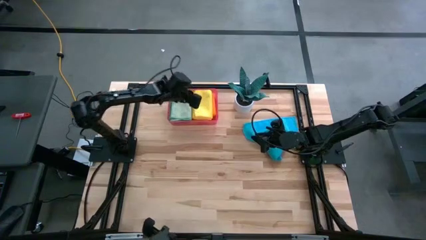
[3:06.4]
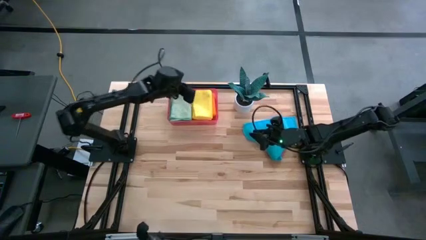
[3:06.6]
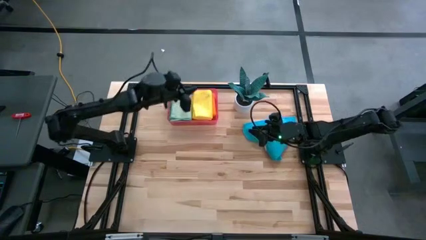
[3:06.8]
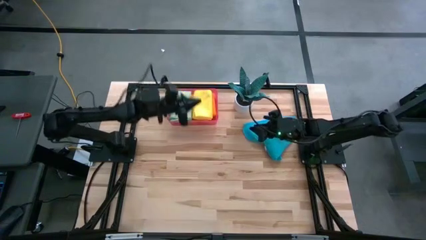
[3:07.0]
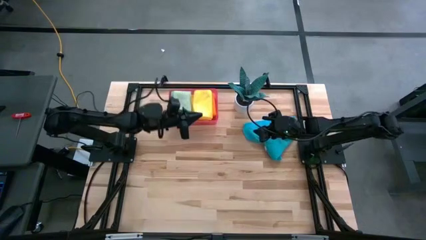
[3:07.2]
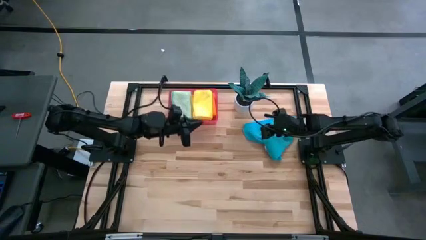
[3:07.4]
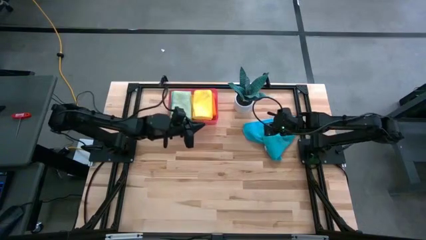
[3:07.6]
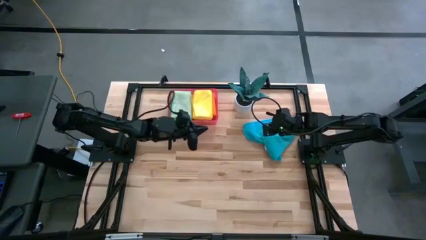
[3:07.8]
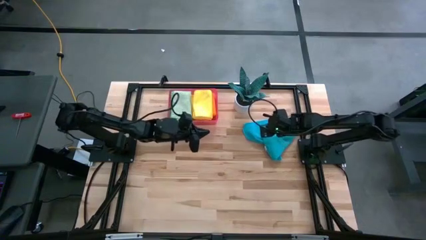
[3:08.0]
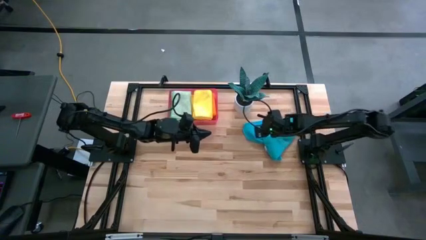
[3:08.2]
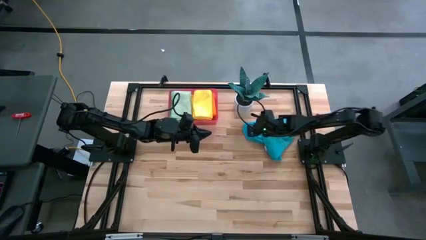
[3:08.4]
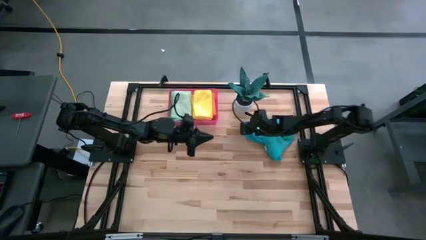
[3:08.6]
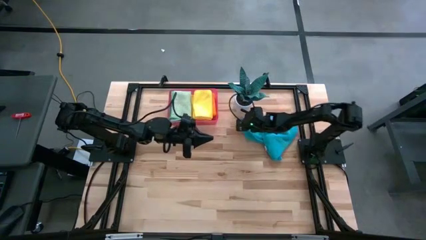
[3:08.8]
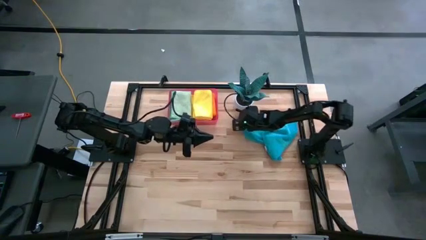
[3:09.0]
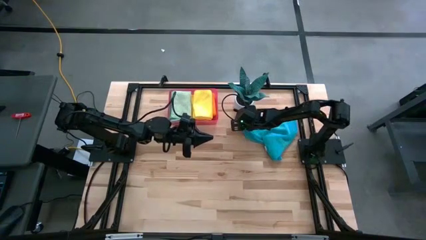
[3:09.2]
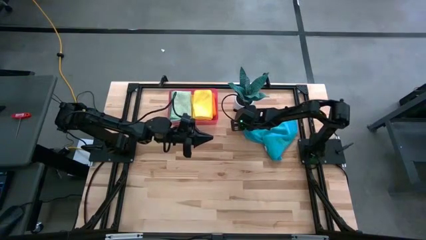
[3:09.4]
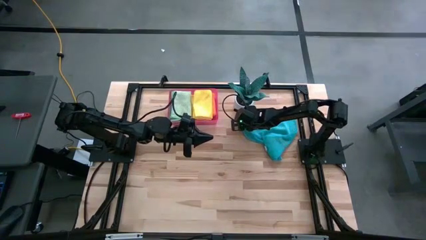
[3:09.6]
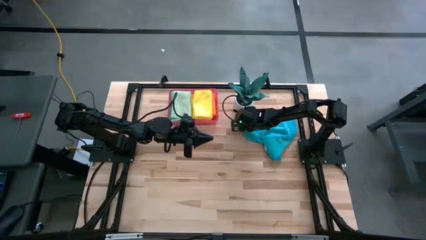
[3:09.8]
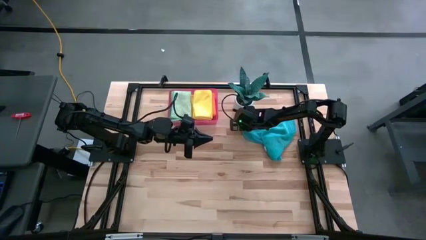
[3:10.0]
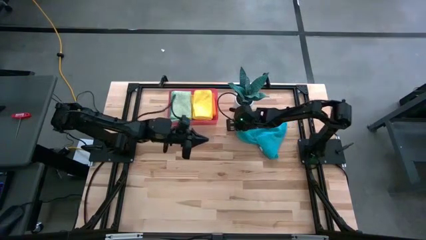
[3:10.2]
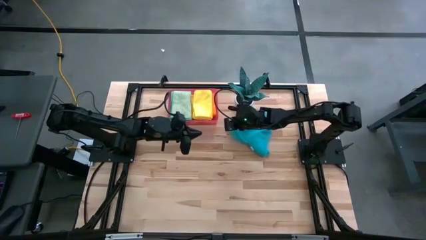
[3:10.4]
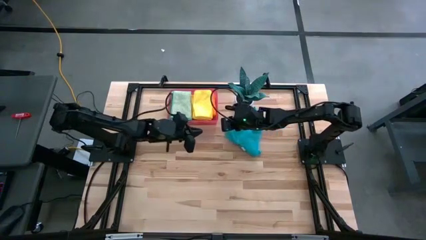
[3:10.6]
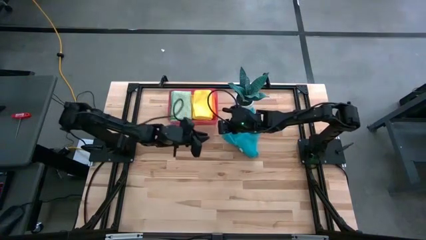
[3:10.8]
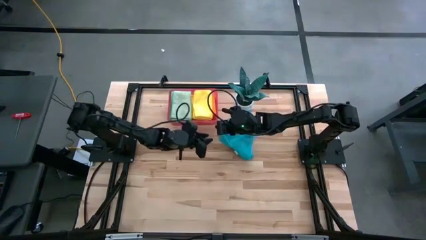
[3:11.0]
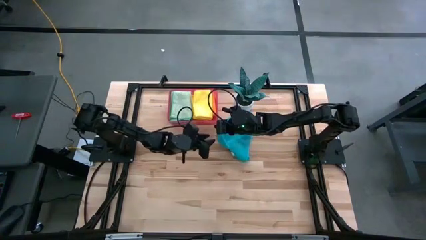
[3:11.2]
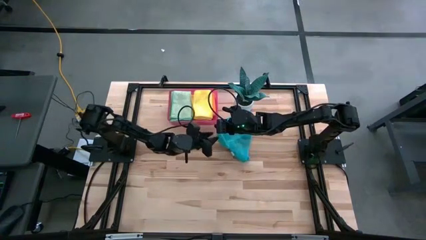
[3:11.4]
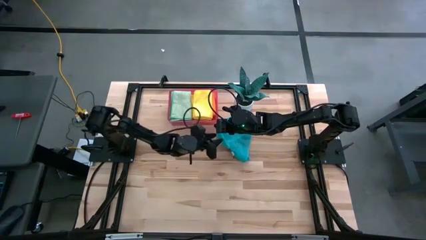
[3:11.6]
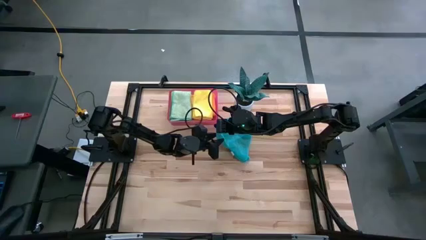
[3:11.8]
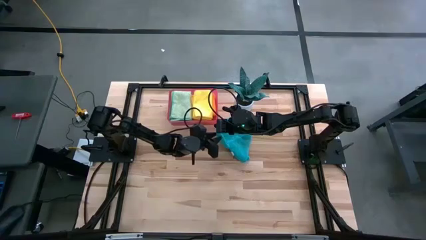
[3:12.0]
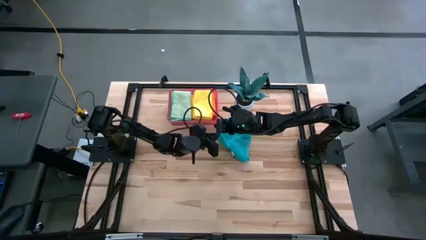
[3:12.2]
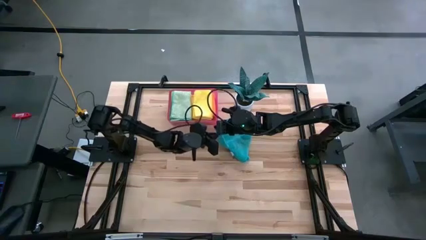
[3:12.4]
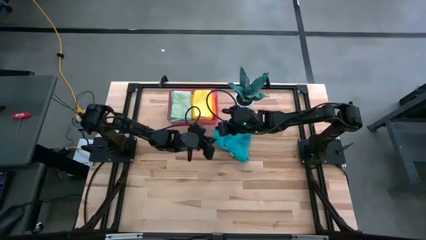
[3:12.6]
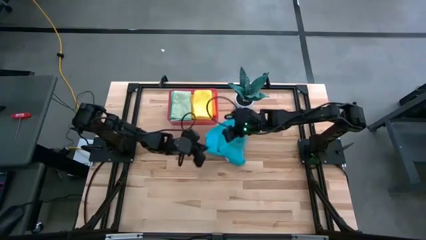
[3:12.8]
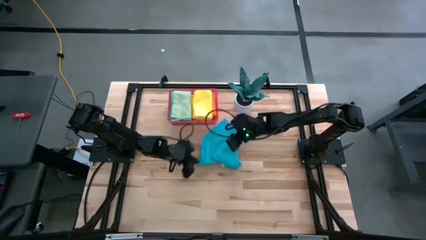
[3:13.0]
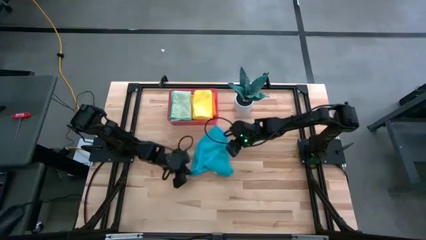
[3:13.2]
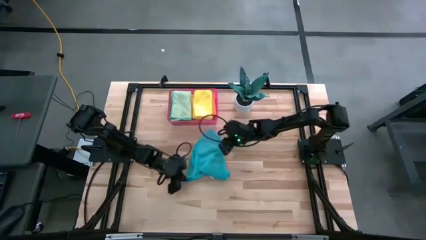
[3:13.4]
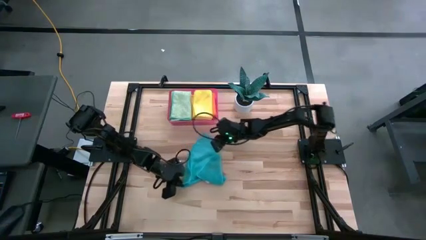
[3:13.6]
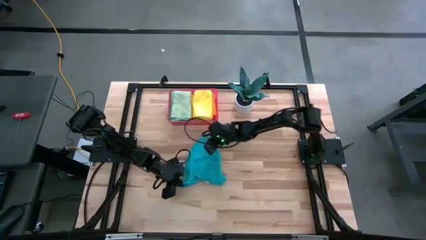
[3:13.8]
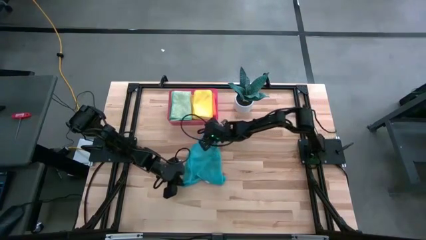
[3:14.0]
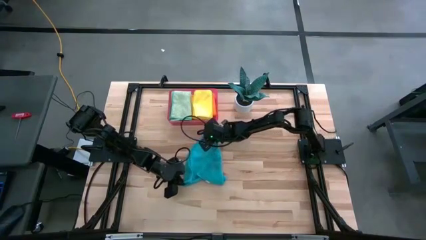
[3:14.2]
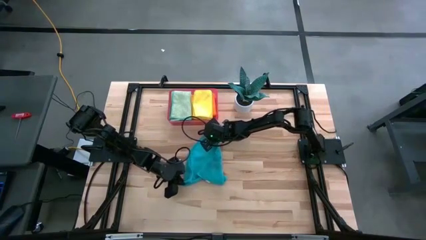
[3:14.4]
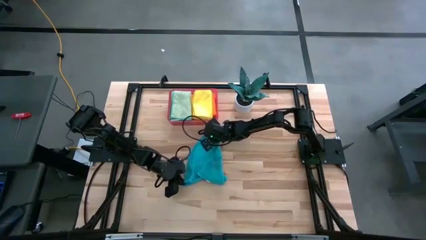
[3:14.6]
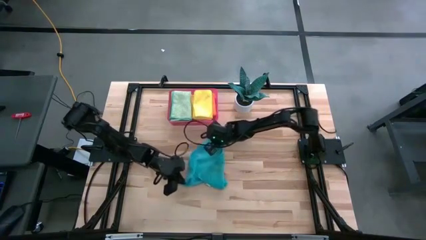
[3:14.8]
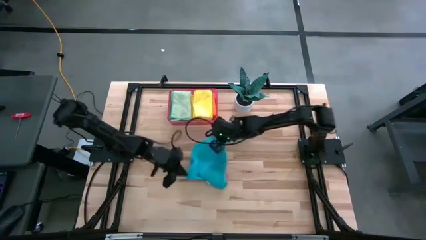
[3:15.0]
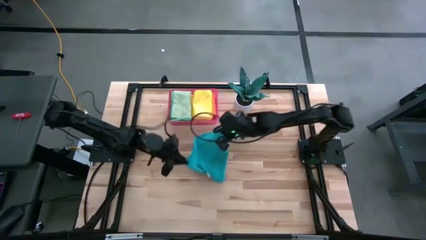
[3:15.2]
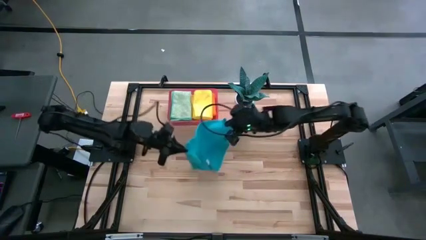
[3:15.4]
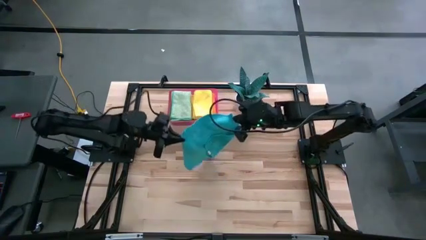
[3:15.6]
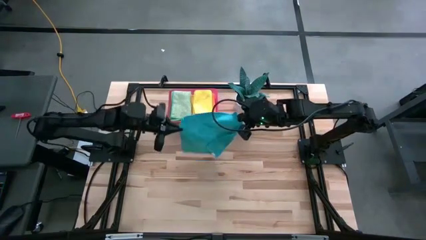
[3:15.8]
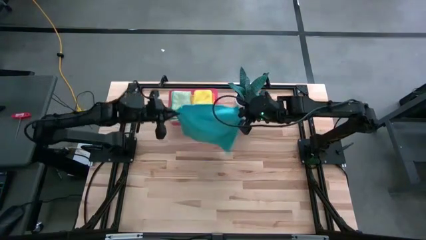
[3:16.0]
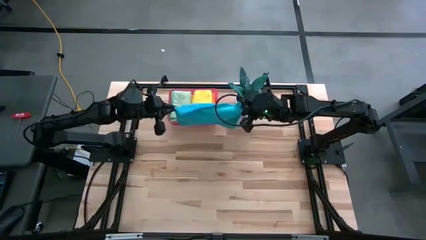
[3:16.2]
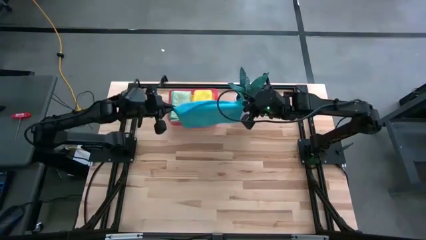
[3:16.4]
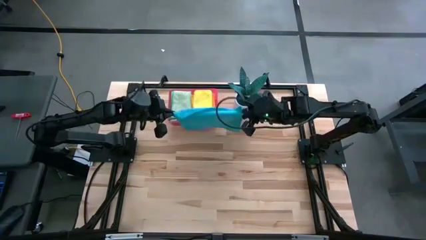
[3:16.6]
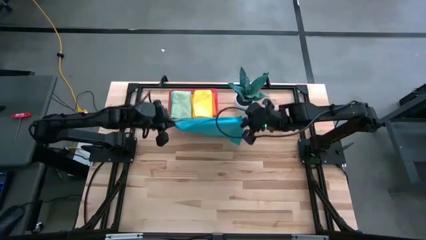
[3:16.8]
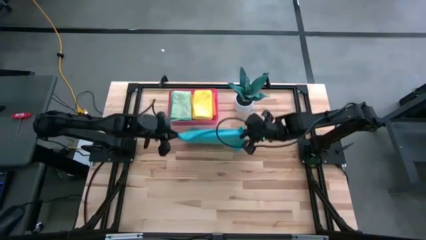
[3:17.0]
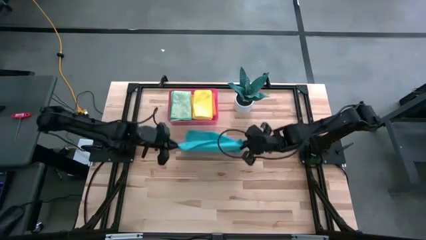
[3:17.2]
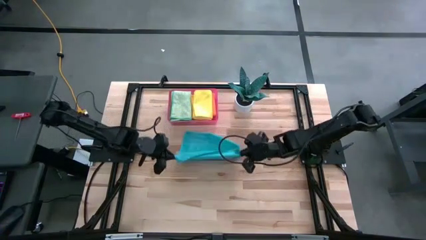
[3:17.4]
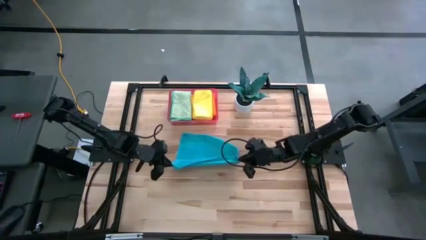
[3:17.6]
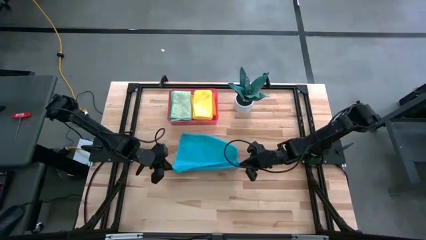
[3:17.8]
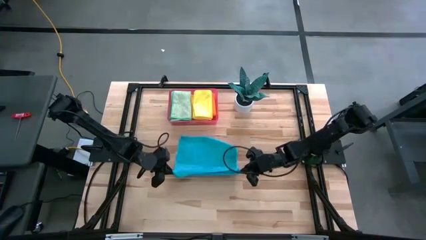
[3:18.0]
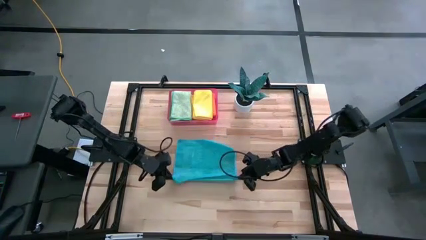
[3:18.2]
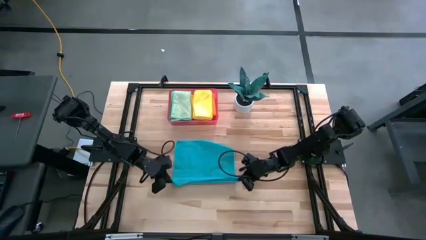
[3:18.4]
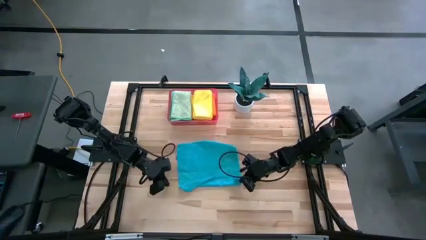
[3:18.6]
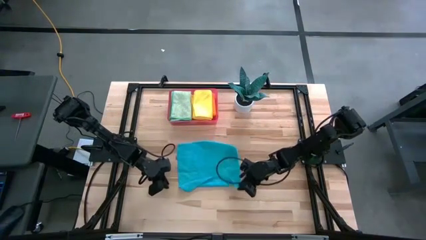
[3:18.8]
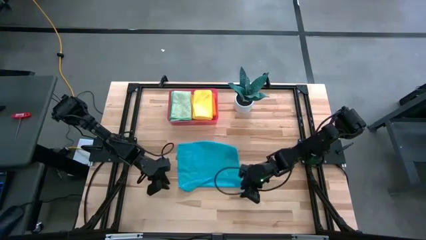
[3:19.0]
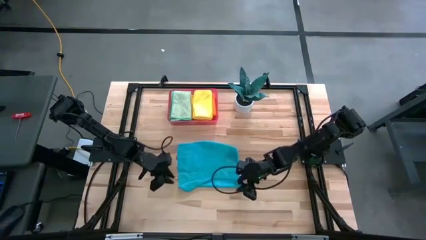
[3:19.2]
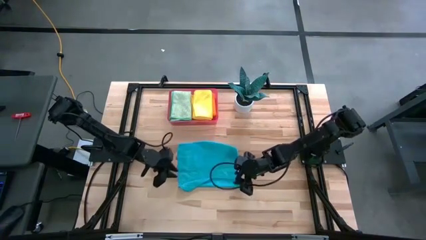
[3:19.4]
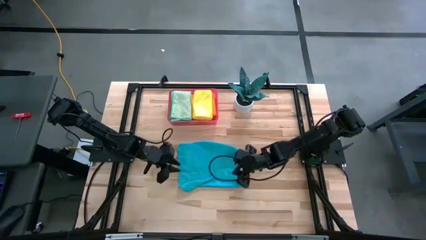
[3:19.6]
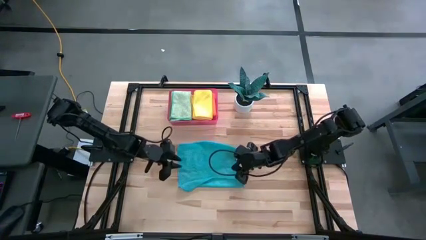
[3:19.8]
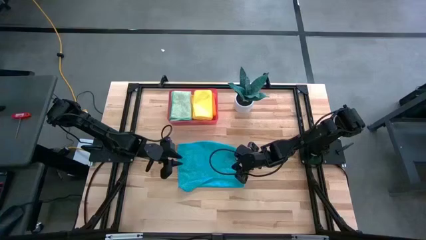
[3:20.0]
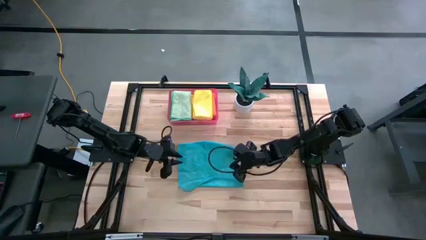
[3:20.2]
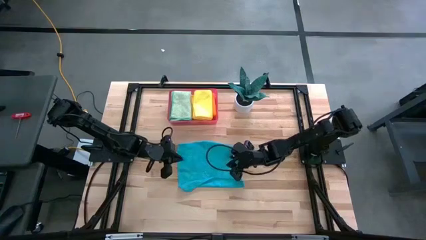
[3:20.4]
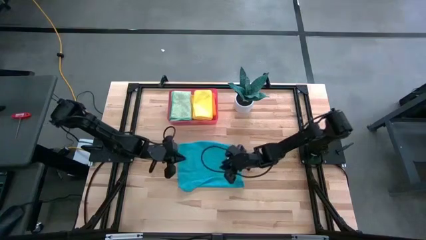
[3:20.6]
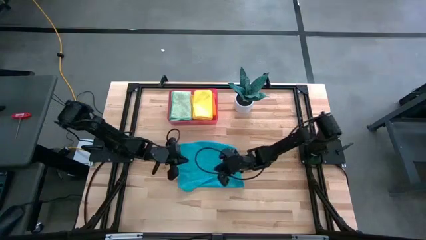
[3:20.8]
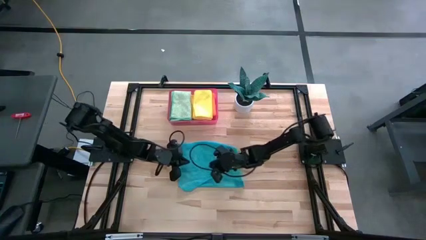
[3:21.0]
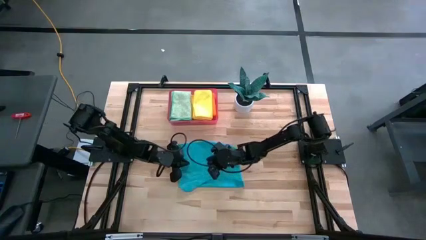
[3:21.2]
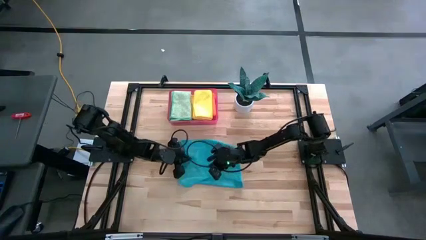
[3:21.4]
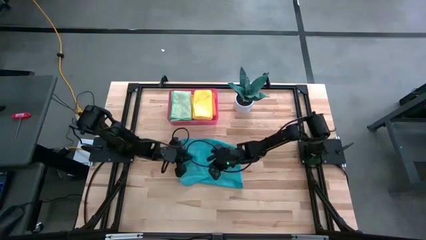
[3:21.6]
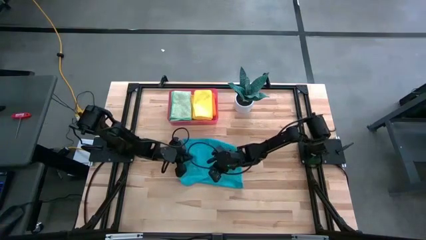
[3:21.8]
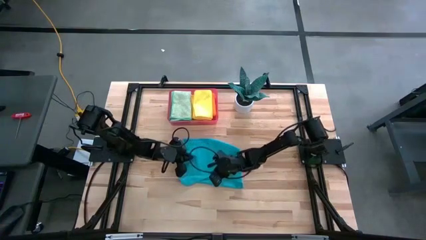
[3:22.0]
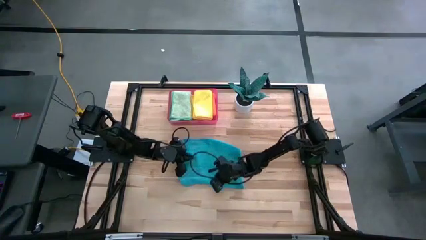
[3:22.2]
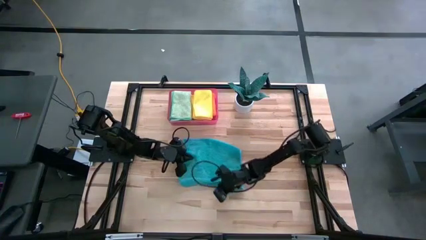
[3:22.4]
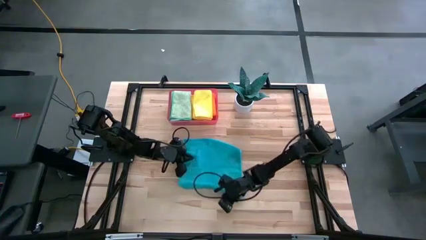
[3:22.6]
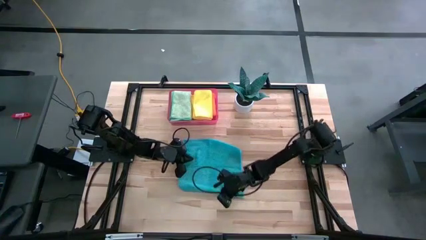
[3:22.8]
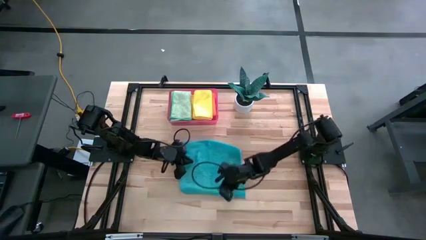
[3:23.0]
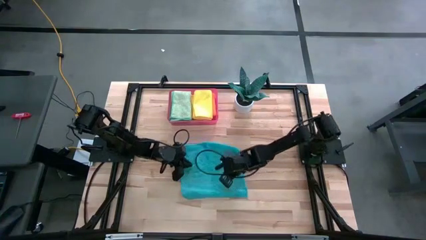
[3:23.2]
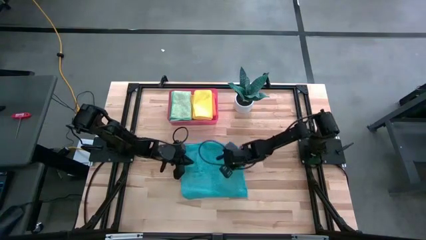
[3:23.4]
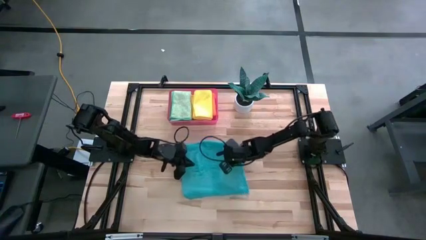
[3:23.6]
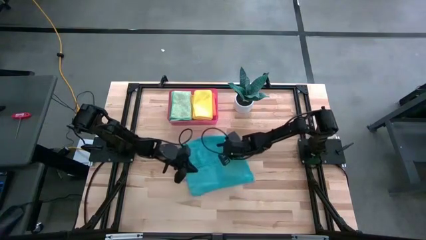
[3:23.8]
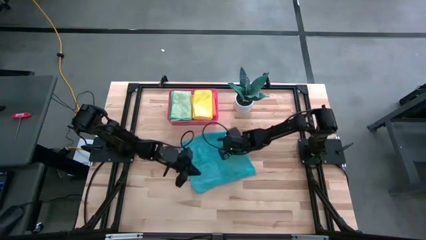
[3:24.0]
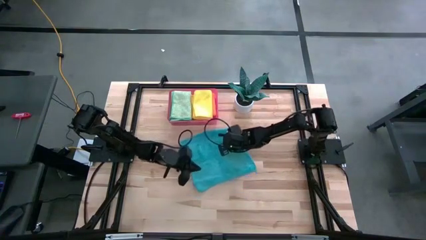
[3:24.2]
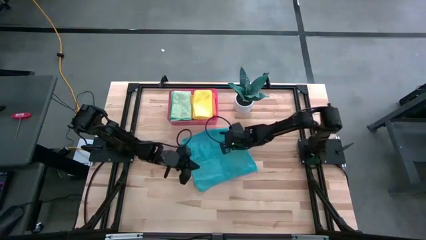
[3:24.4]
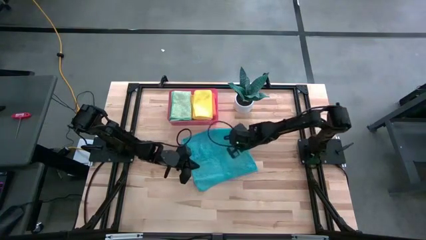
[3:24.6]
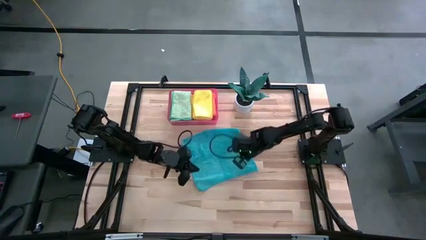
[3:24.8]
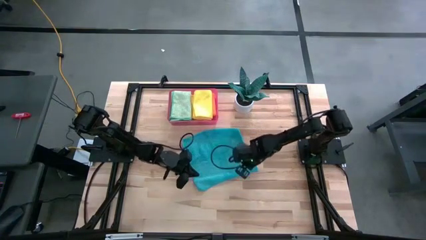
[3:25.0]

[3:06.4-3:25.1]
Task: Fold microfiber towels
Fold the blue microfiber towel
